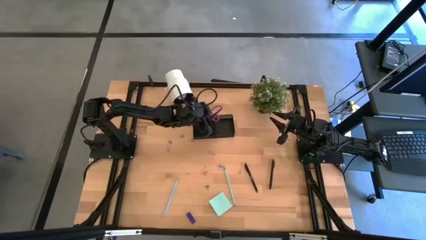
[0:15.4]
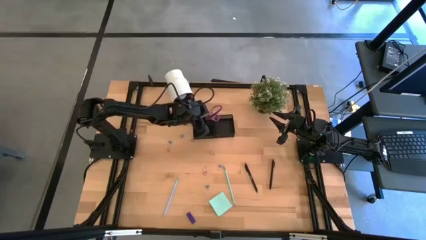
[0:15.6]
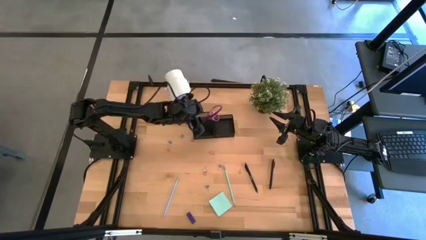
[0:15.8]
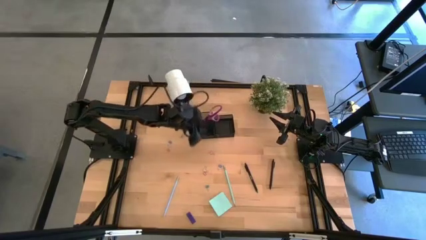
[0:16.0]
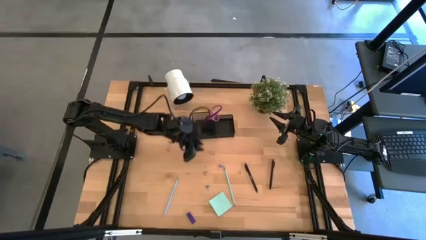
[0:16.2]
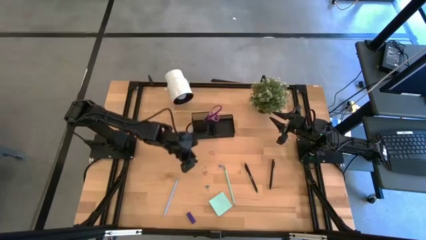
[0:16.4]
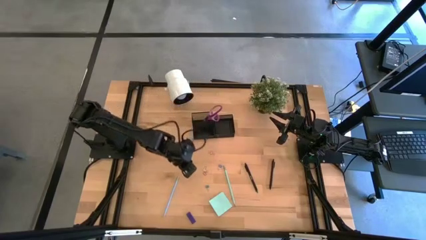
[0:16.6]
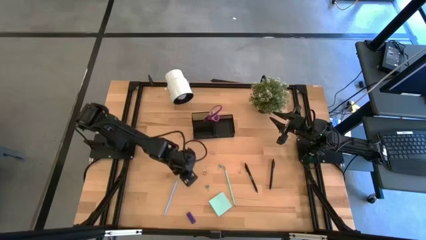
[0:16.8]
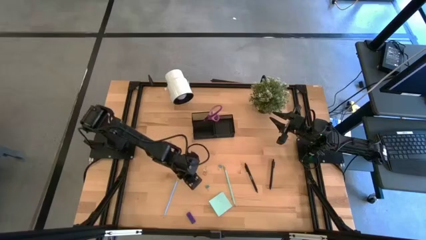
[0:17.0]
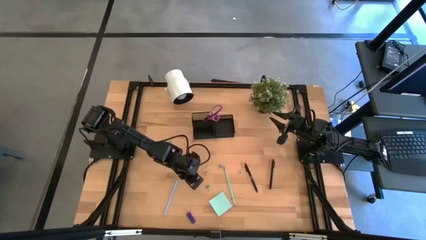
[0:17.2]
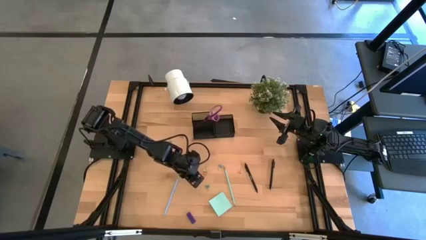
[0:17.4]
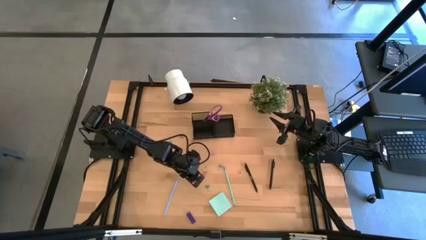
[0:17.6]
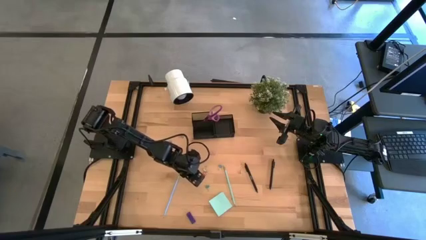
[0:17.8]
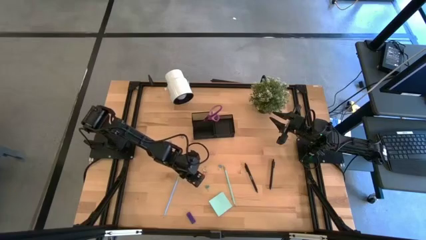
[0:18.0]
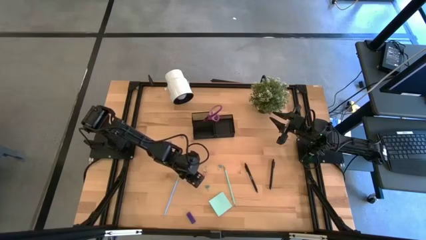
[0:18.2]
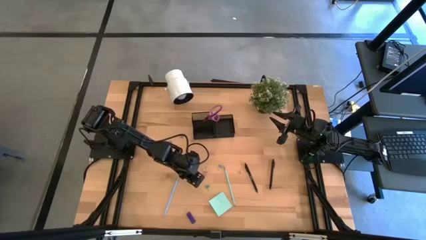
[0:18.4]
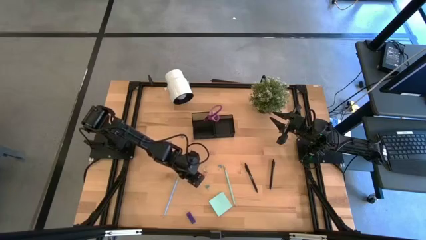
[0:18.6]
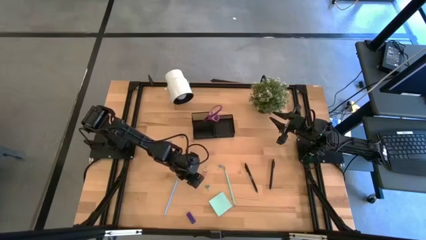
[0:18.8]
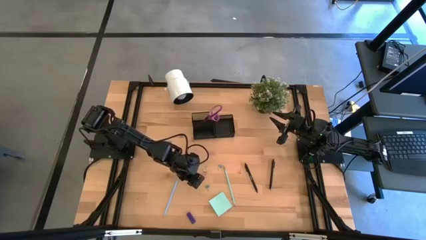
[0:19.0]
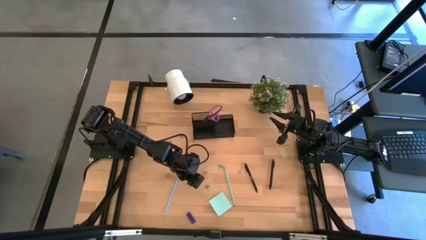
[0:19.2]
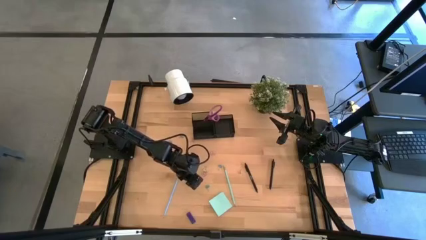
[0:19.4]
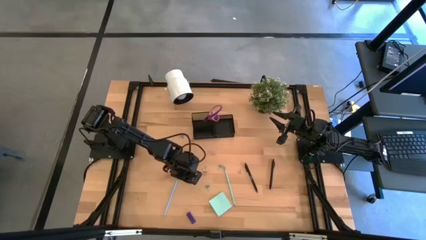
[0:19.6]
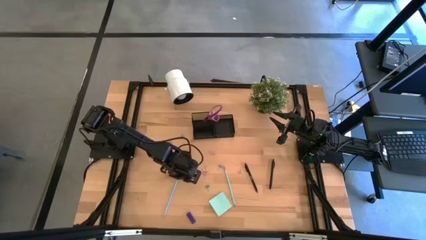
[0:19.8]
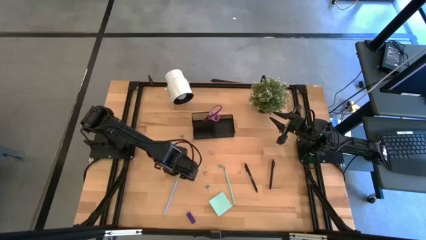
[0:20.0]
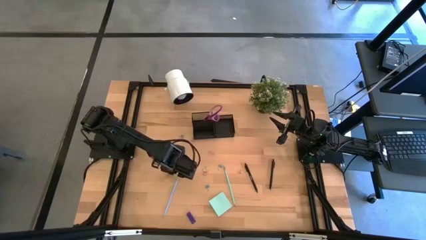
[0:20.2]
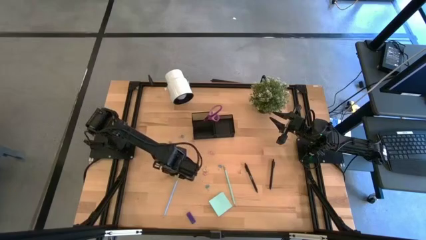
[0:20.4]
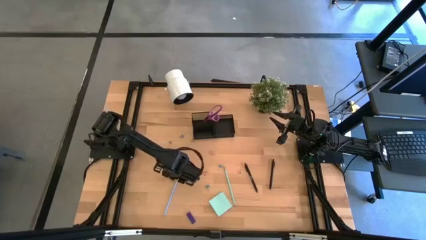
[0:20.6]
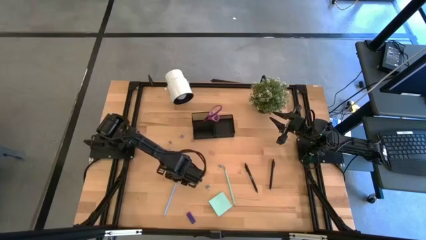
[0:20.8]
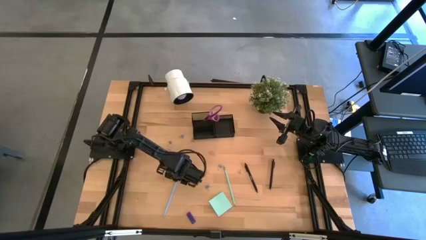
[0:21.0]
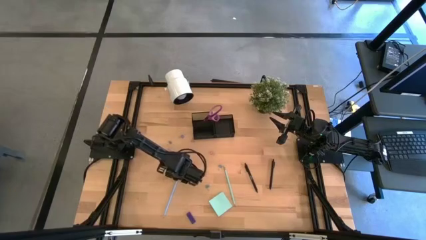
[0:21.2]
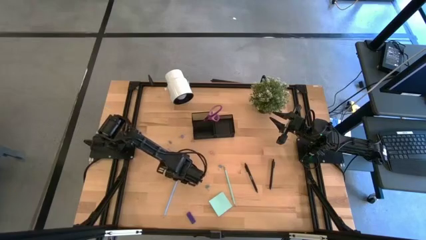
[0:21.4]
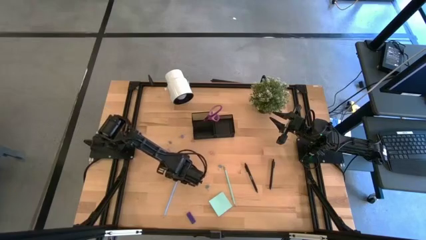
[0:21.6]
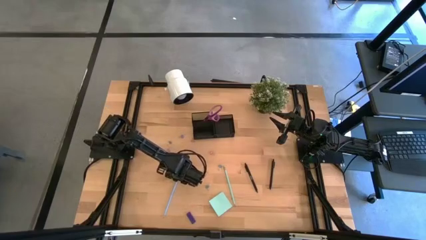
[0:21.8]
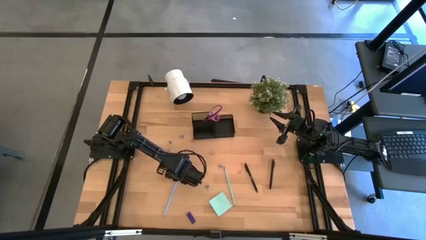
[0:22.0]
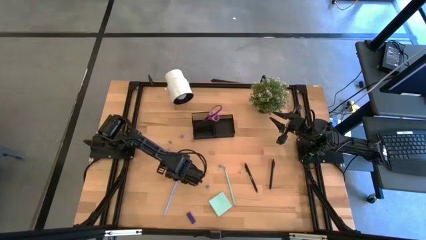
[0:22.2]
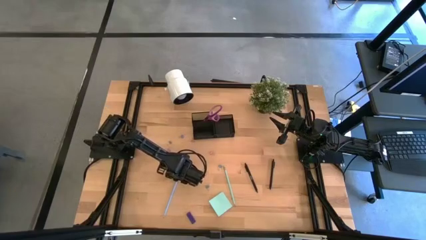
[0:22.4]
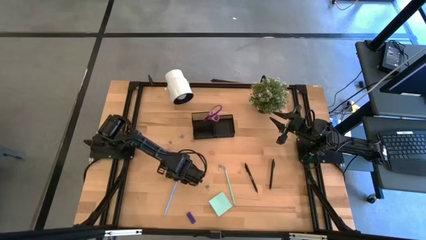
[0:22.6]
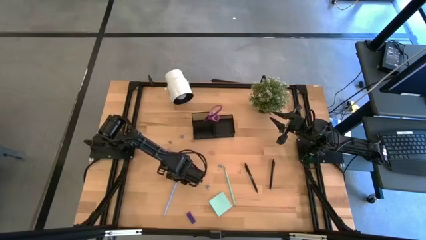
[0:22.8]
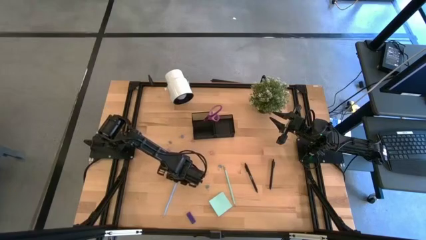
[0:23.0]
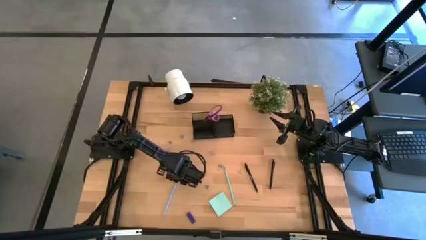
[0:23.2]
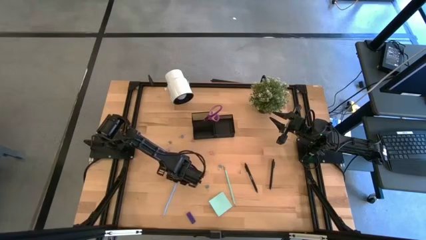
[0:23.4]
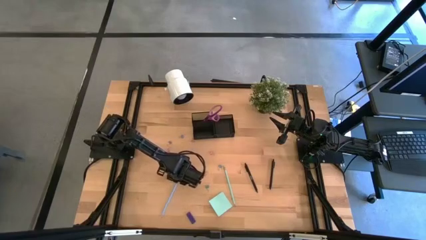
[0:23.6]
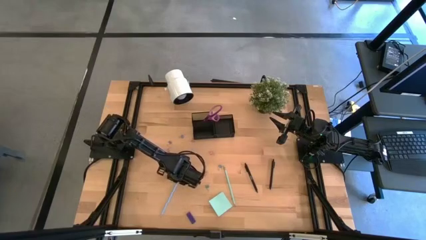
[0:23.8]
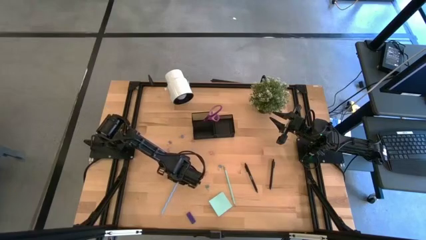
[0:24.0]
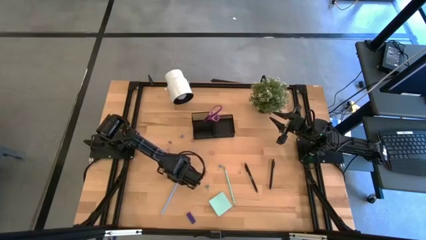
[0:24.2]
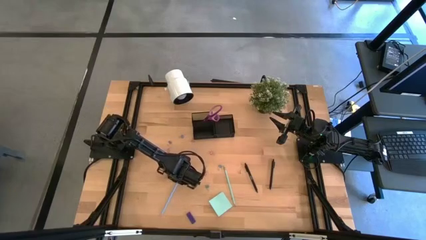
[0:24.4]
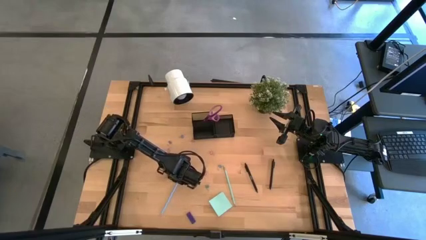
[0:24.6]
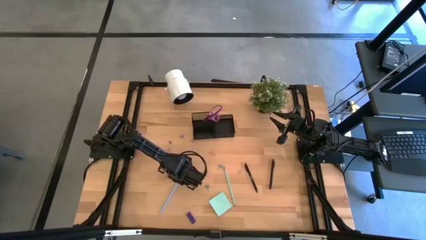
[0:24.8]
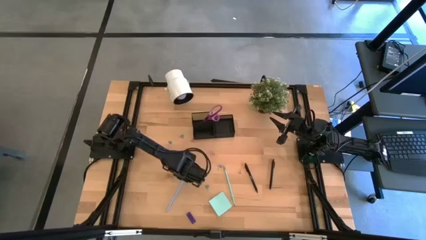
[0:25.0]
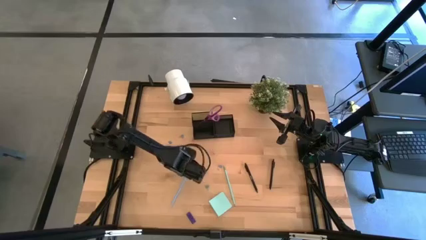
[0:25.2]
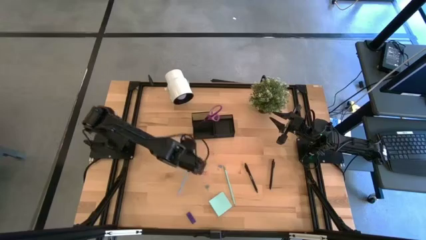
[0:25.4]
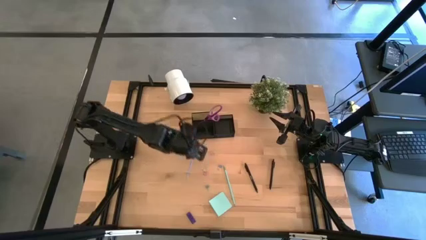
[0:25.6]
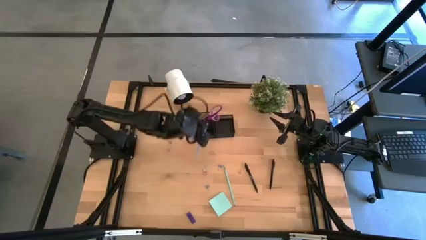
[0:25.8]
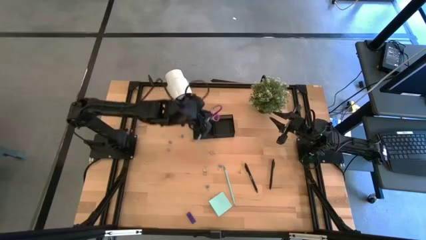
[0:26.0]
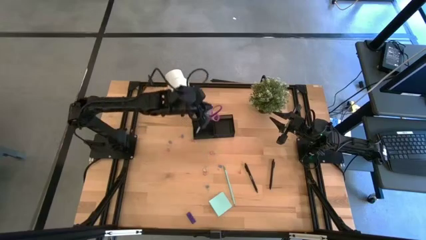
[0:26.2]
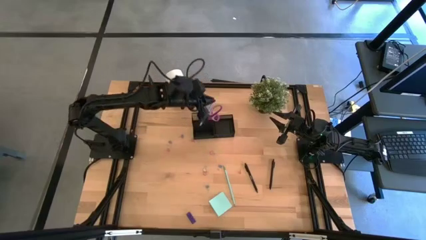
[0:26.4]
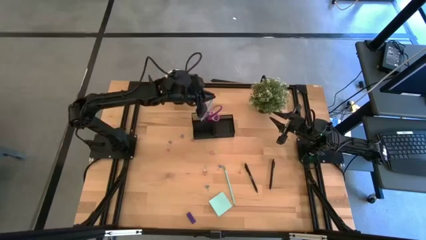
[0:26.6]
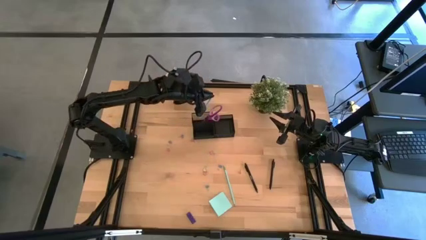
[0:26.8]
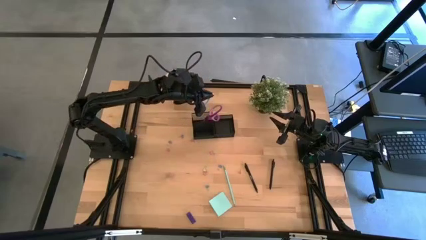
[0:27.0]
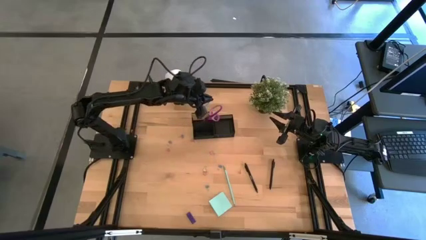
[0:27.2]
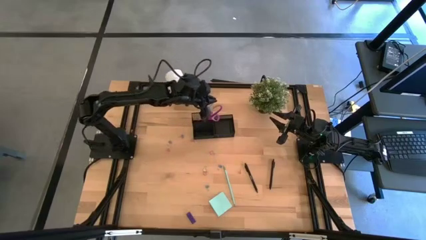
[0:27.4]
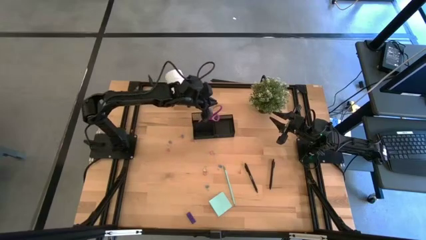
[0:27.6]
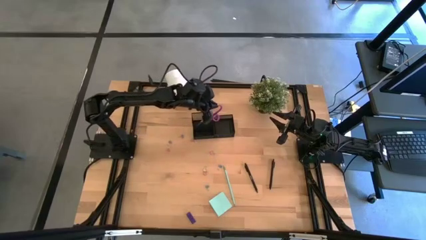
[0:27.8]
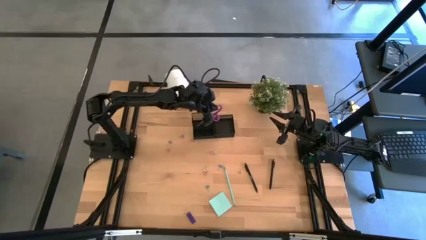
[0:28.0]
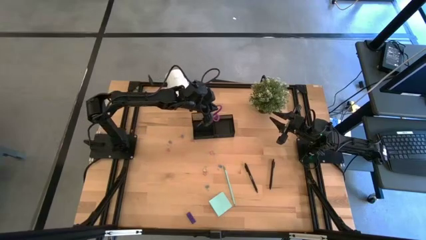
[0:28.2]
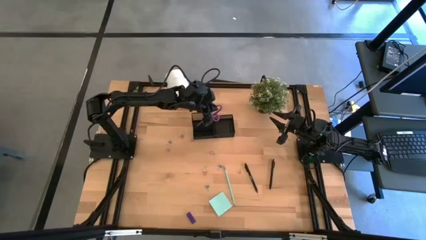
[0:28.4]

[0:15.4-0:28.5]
Task: Pick and place office supplies into organizer
Put the blue pencil into the black desk organizer

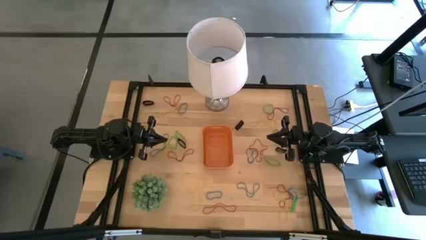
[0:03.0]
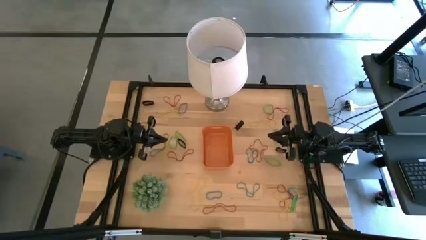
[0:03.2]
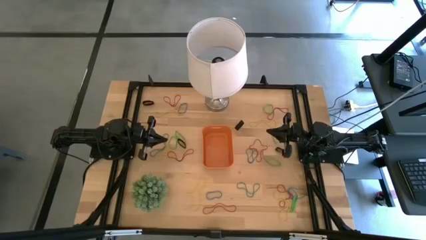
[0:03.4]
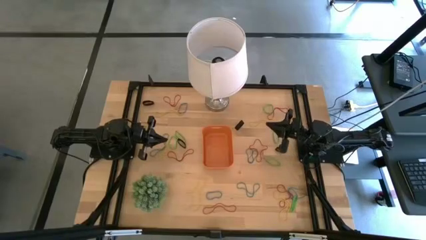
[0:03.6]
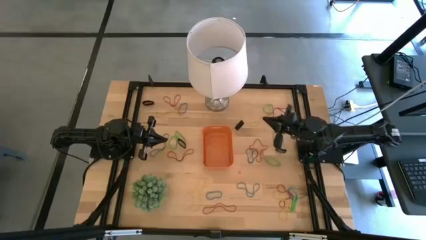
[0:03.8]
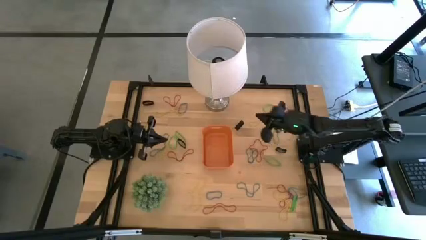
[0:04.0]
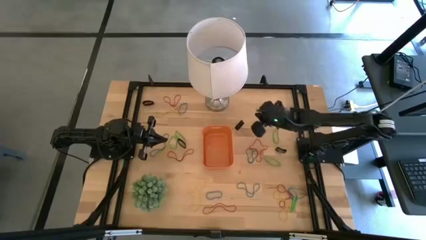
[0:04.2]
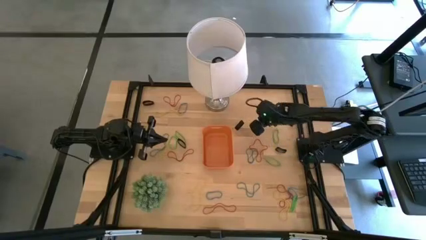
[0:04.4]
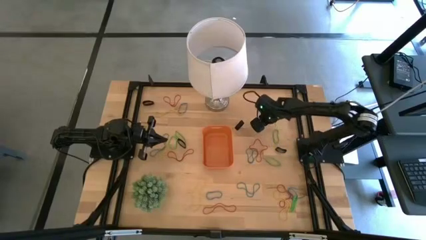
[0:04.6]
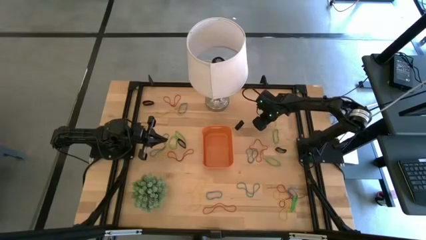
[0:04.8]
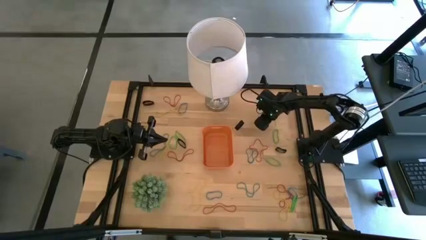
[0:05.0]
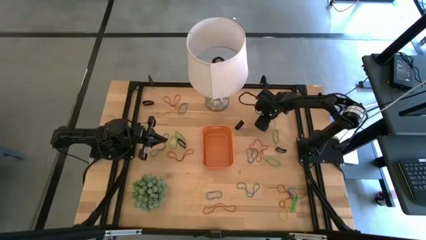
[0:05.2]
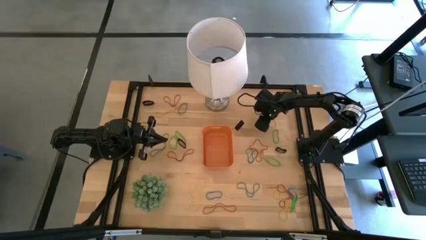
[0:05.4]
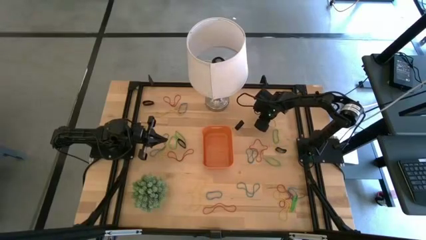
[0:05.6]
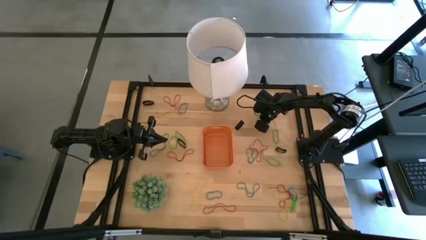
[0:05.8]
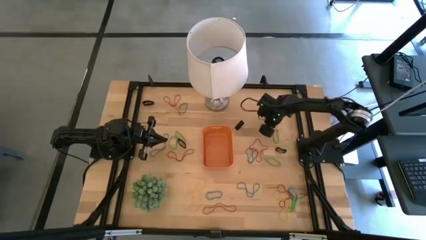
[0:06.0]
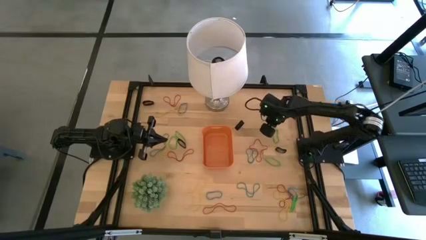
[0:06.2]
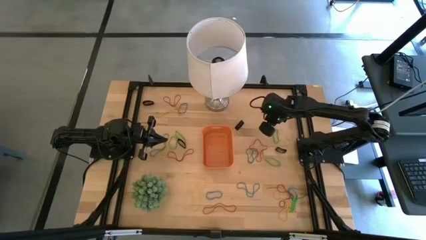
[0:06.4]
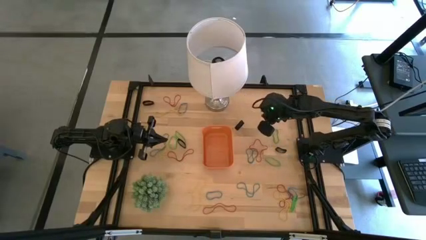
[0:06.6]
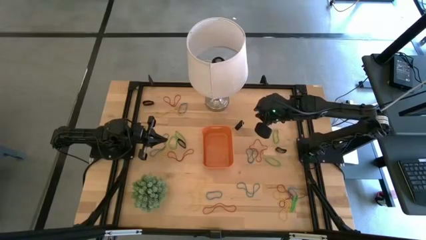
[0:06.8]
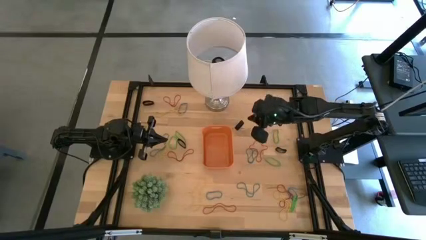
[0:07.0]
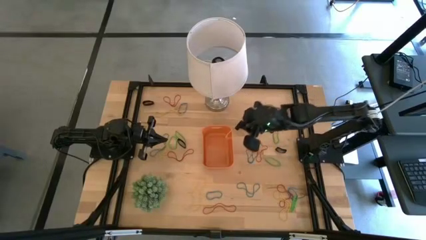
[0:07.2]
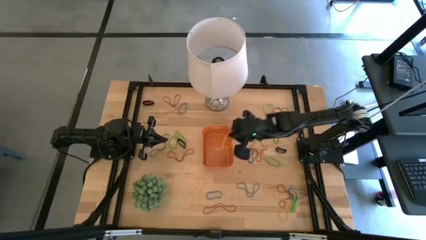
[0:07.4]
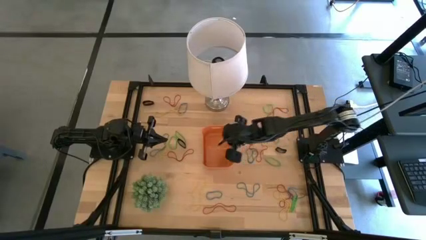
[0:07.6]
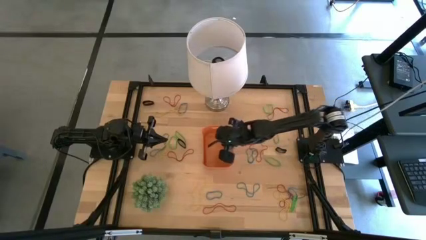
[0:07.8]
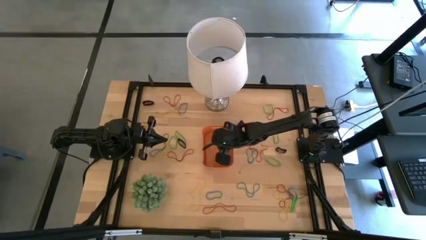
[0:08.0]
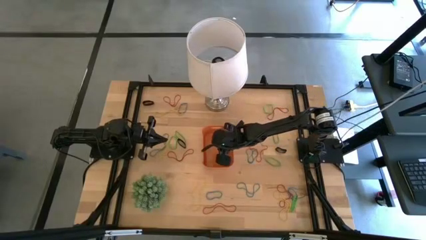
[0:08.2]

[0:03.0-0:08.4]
Task: Pick and place rubber bands into bin
Put the yellow rubber band into the orange bin
